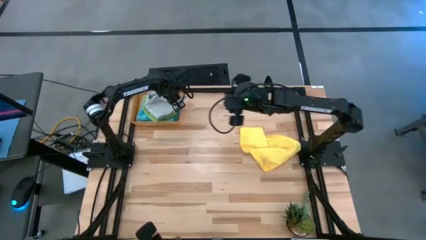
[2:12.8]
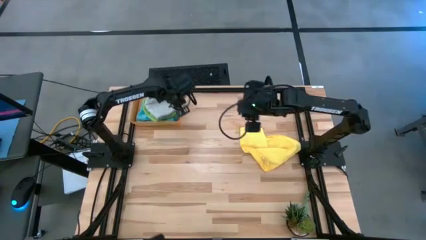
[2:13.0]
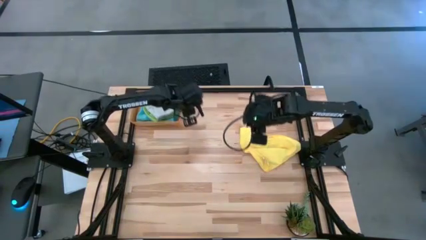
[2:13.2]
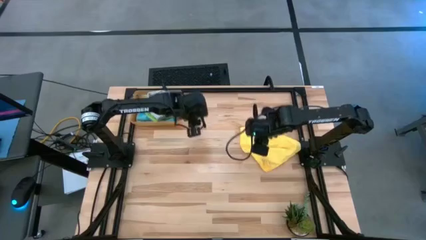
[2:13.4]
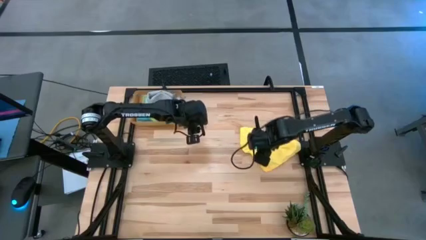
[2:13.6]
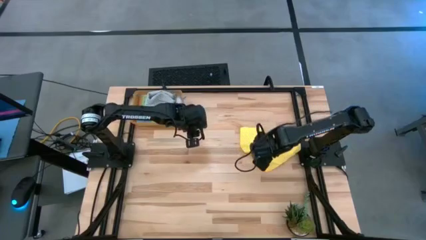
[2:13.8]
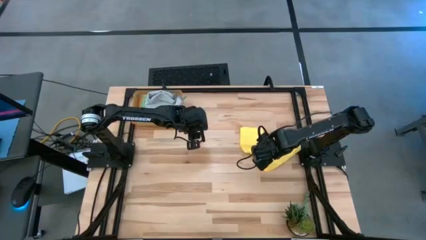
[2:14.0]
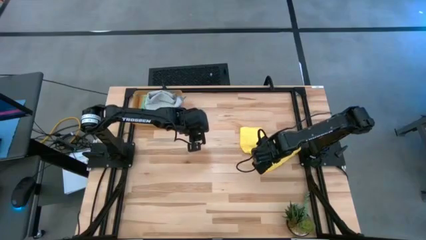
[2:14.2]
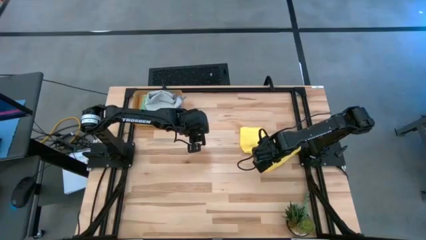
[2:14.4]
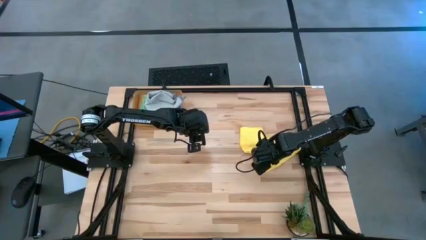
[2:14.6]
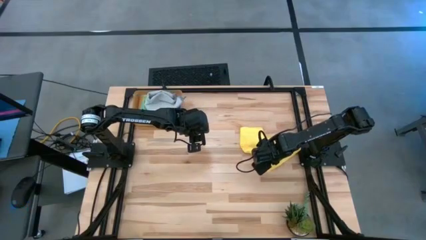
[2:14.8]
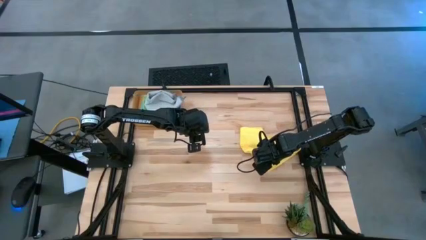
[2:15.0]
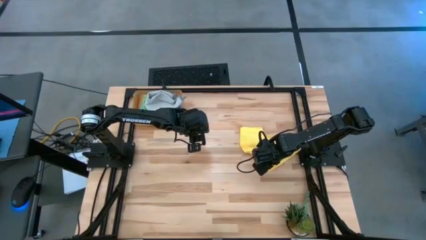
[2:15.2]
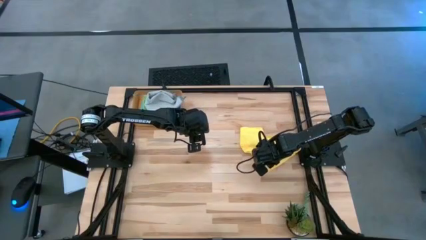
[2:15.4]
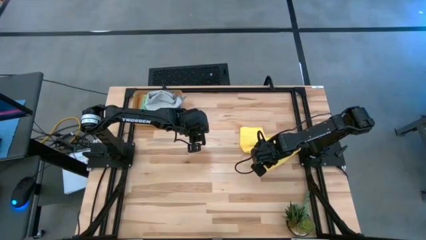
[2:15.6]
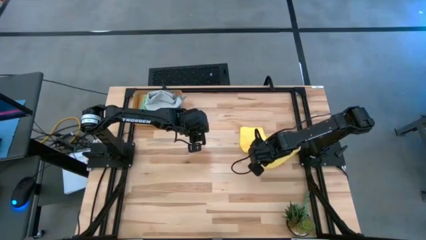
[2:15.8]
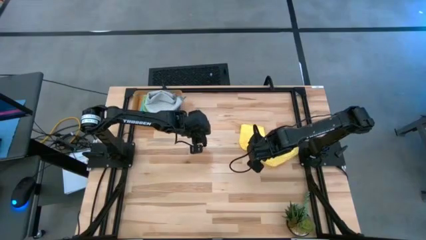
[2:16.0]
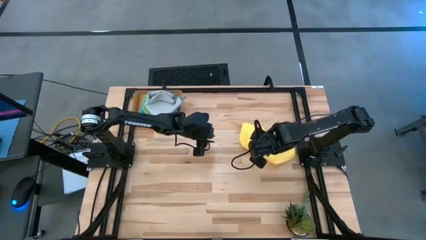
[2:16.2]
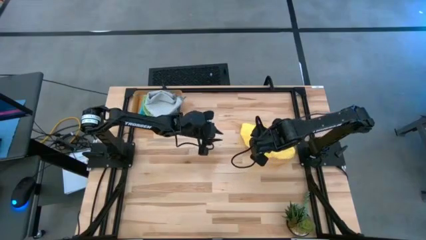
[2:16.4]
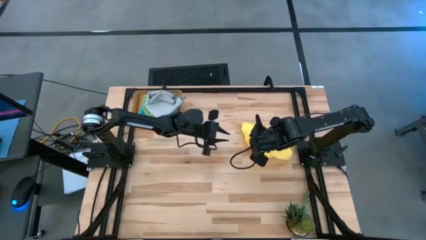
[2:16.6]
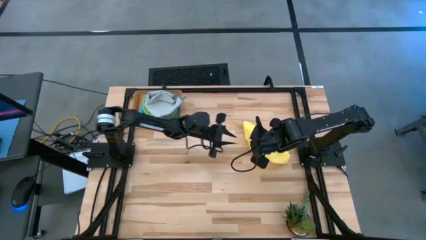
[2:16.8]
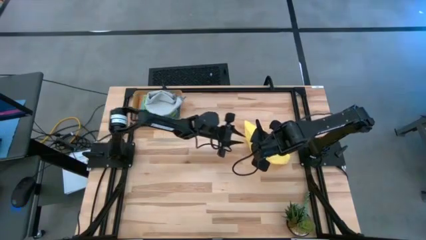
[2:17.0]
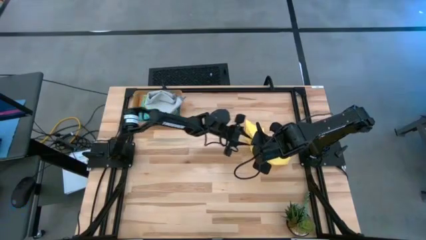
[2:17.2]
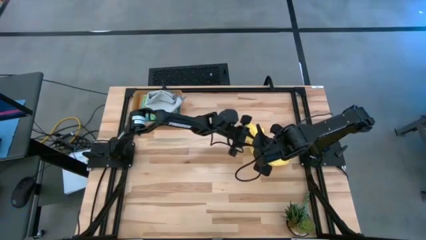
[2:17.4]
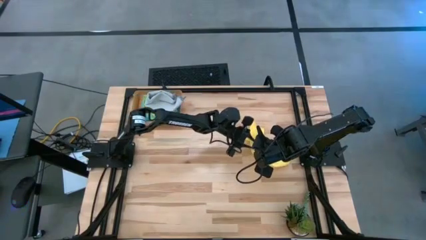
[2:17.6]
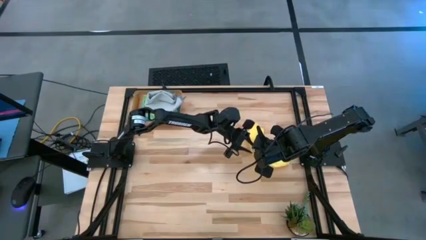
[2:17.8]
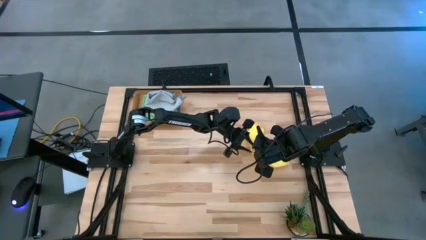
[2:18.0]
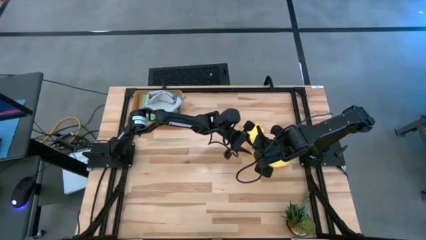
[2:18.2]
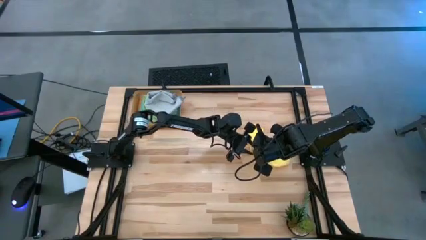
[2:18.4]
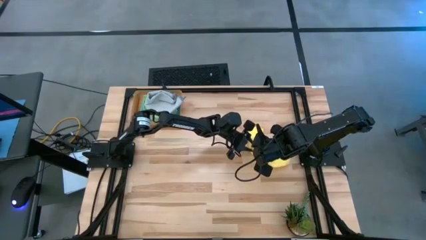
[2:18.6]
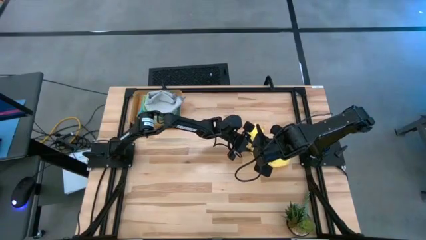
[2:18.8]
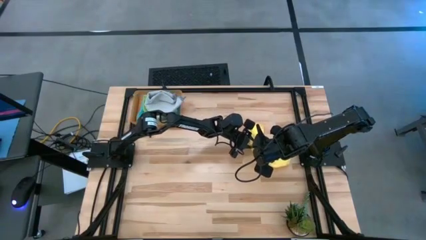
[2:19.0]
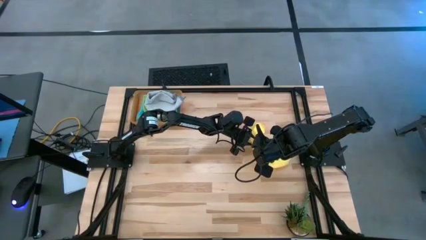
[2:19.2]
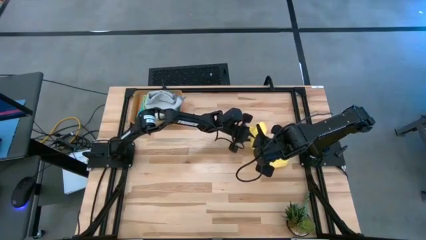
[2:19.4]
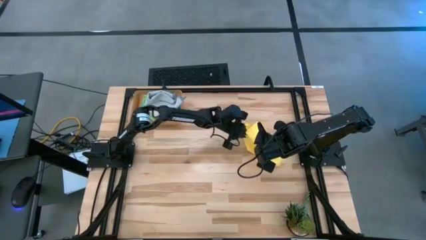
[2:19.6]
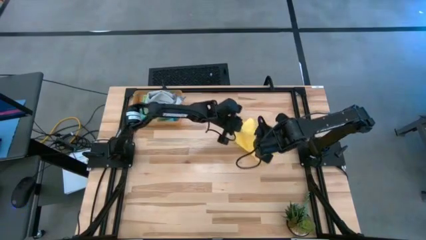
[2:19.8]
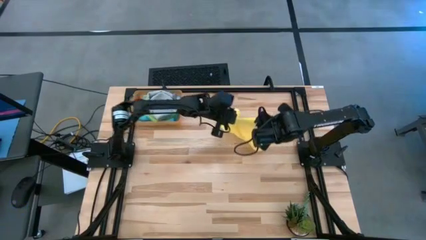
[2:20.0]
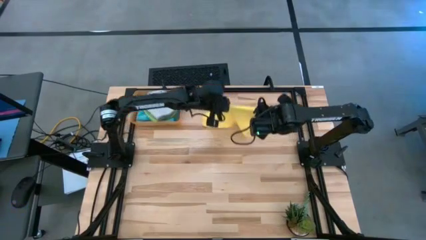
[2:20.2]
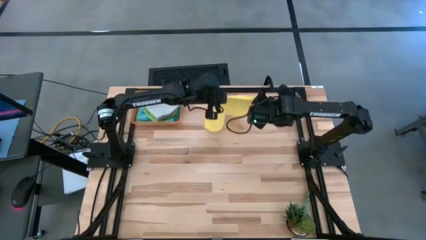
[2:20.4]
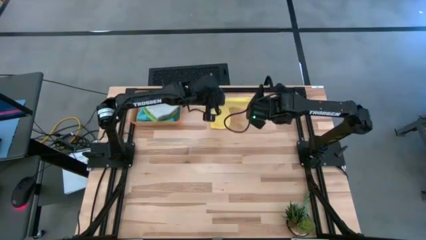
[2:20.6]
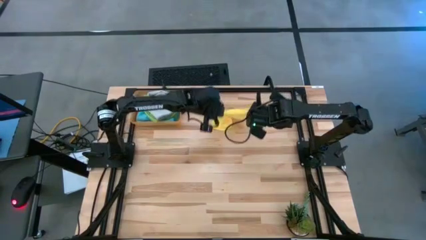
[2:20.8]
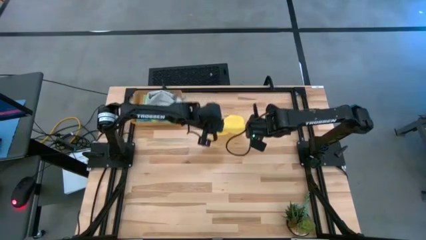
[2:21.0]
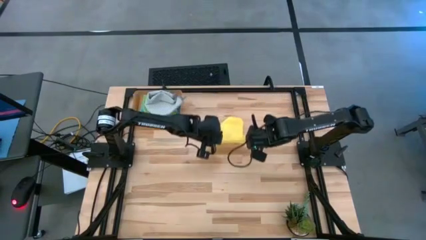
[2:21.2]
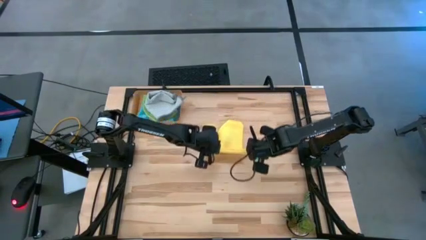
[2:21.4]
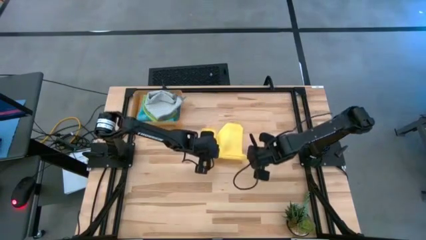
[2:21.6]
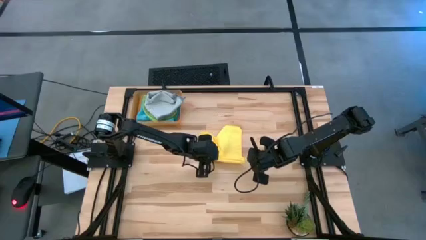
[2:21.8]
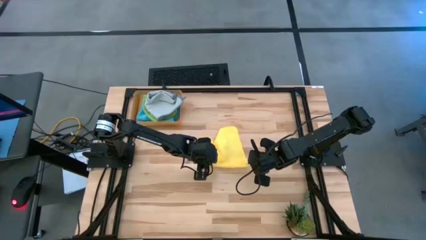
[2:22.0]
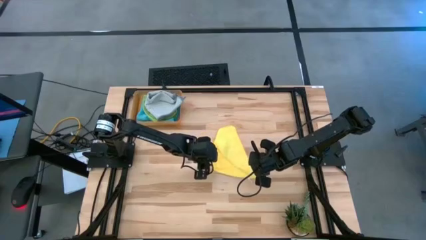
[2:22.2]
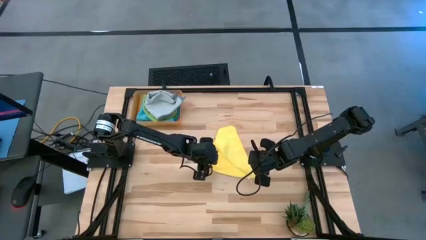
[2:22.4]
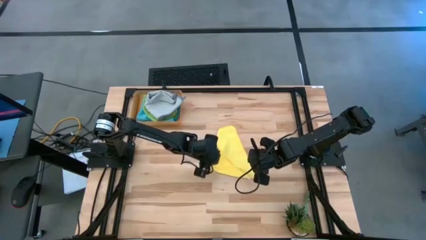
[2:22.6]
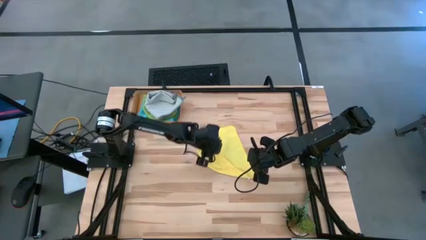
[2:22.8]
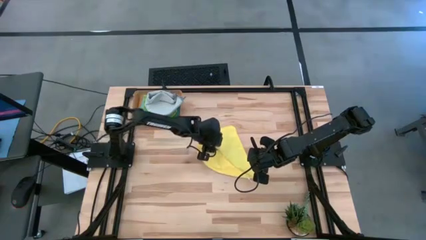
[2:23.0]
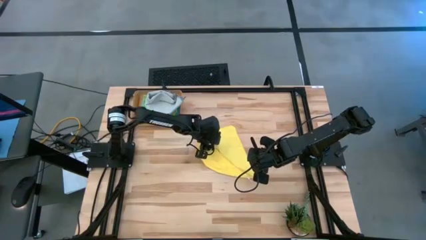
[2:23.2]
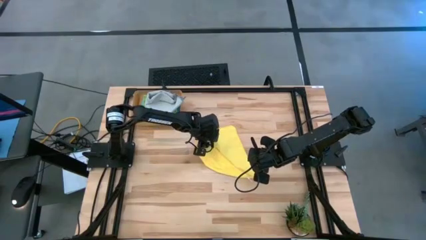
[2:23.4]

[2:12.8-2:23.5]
Task: Fold microfiber towels
Fold the yellow microfiber cloth

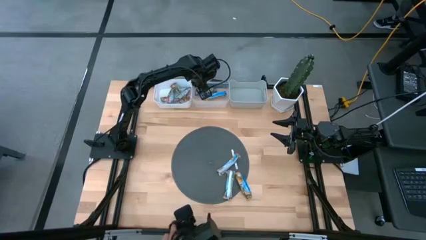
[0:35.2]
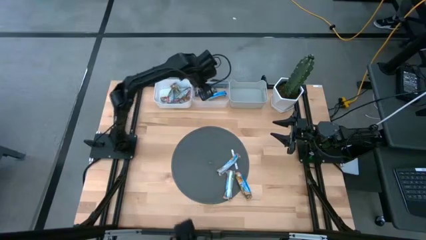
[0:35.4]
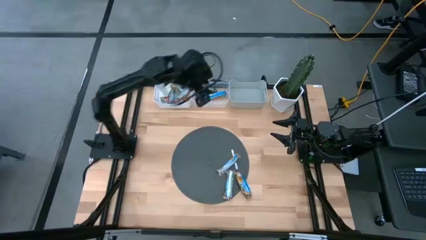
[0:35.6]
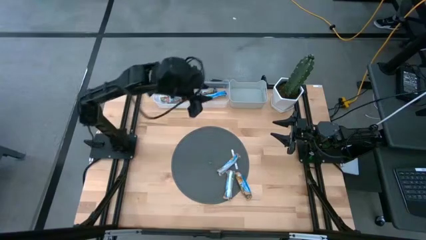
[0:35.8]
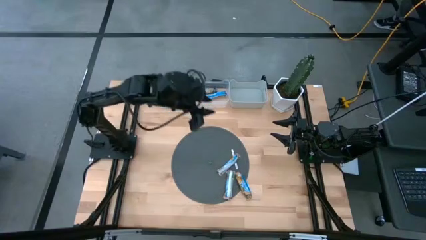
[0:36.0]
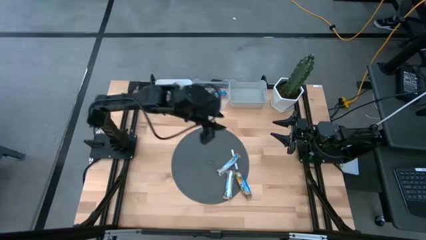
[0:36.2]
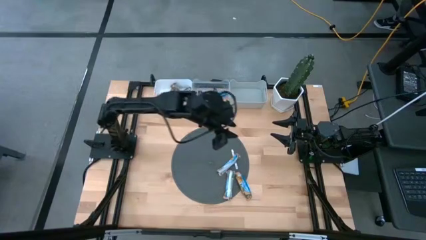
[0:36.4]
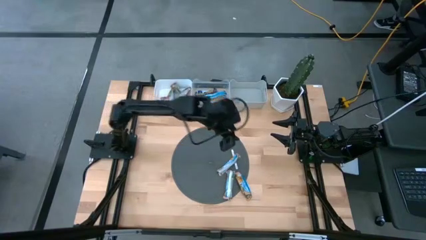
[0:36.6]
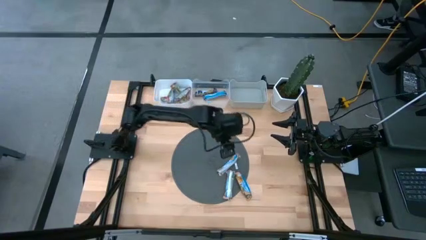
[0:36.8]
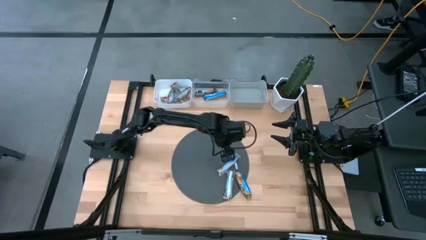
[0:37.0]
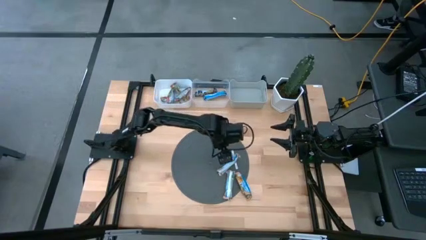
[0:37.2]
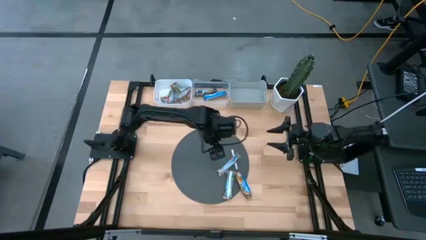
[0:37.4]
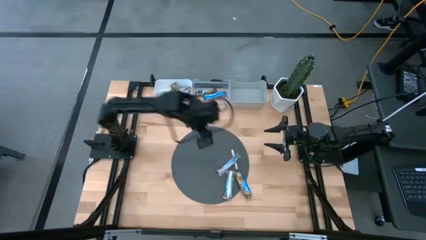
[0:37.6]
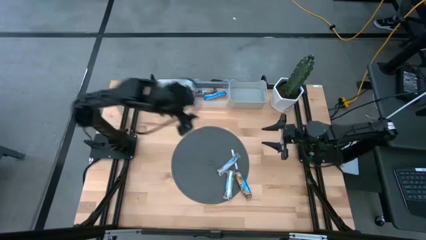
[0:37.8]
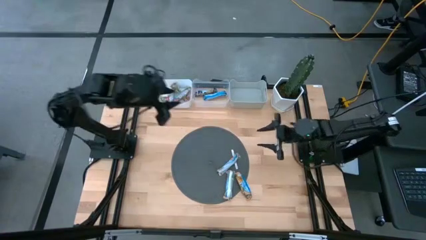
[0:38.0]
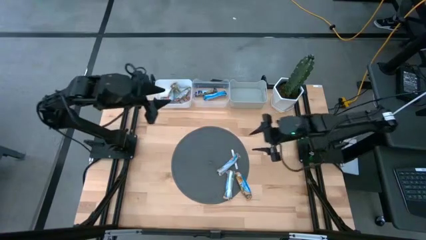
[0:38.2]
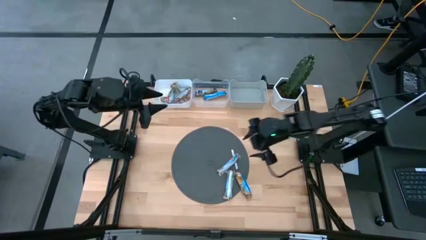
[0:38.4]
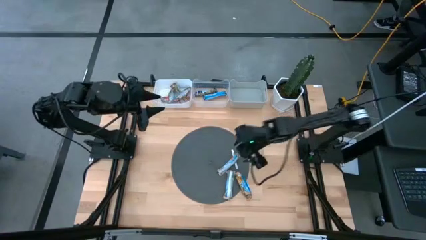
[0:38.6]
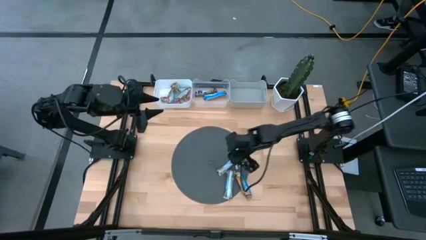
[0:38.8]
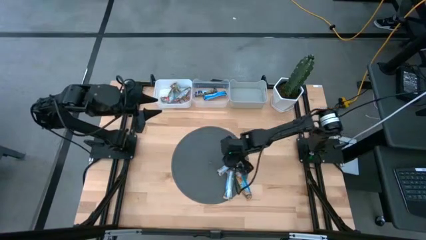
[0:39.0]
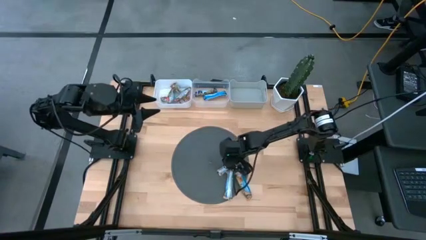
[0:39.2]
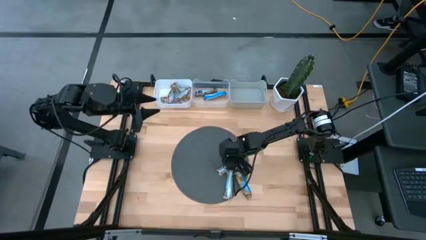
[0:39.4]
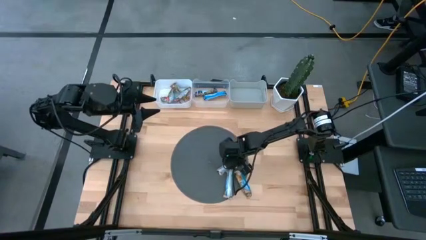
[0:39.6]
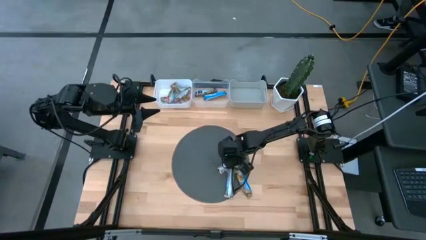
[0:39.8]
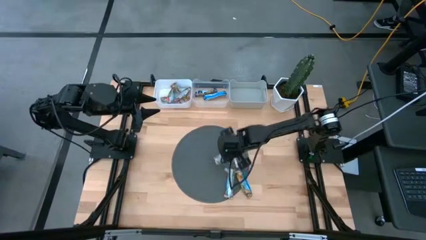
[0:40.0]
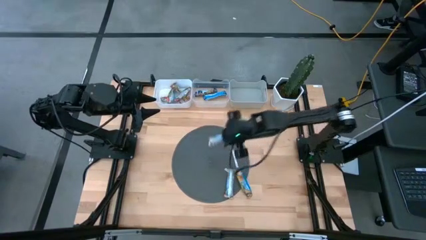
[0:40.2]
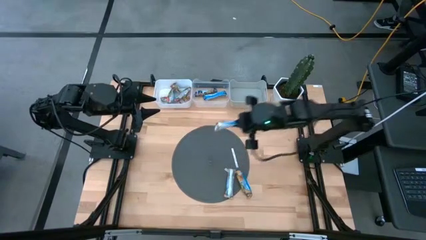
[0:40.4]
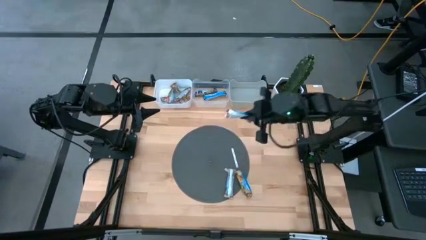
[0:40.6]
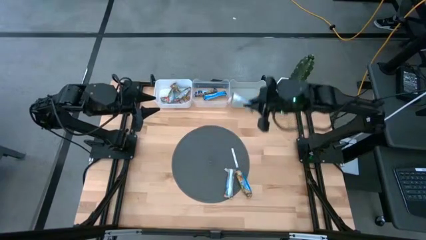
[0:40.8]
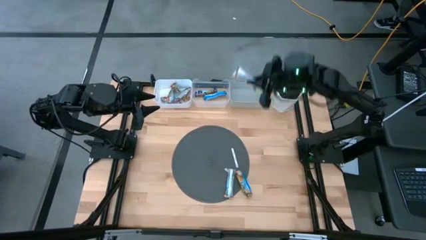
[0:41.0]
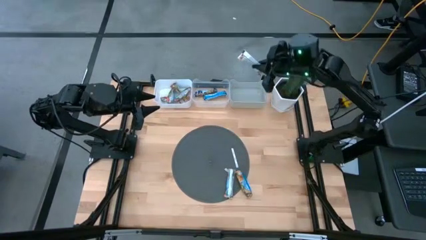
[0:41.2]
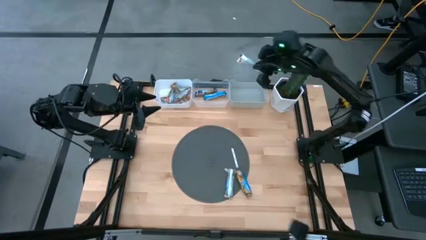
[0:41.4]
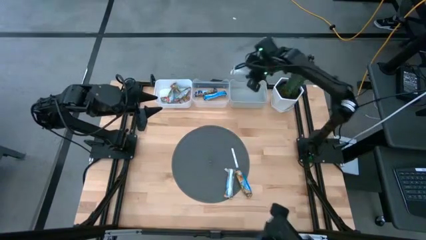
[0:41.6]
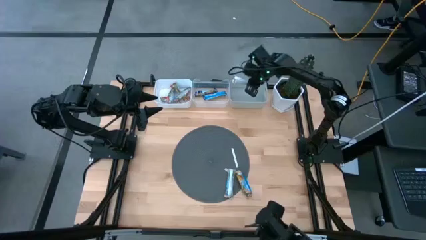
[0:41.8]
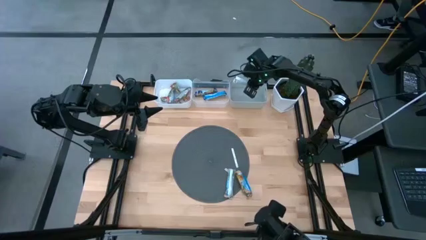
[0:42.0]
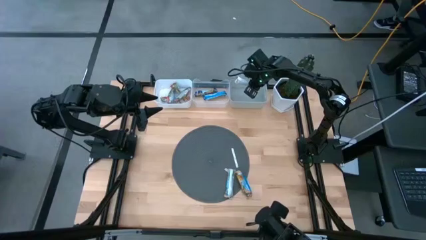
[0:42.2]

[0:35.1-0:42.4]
Task: Pick and place Granola Bars by type
Put the orange granola bar into the gray bin
